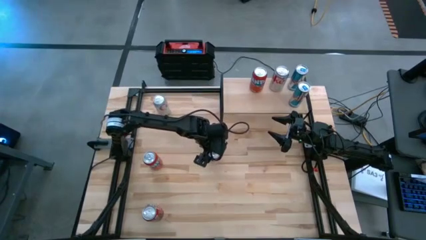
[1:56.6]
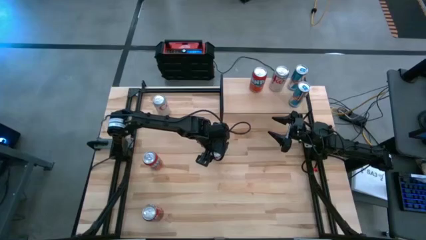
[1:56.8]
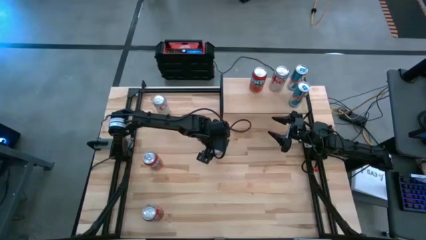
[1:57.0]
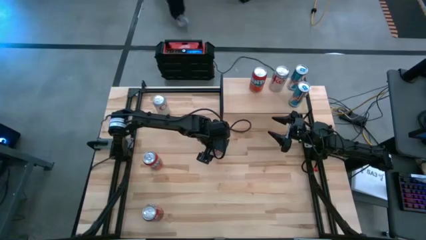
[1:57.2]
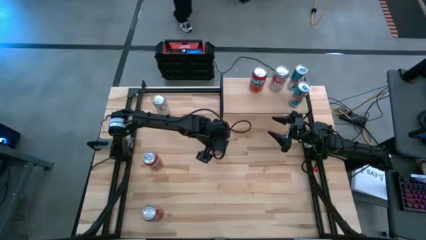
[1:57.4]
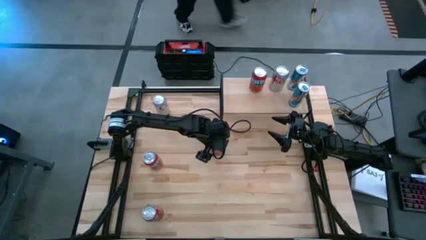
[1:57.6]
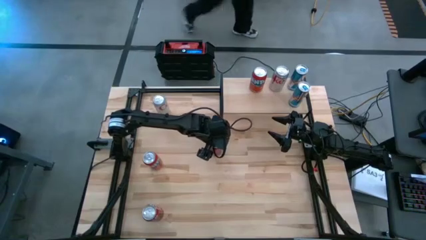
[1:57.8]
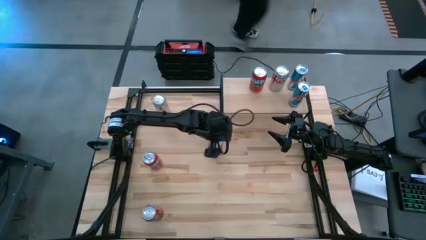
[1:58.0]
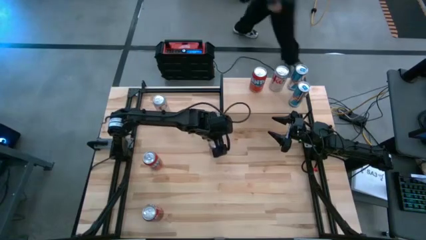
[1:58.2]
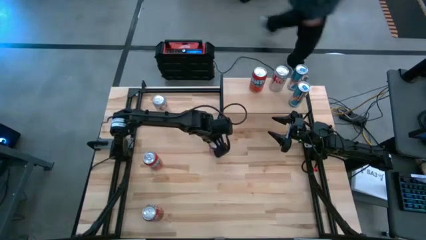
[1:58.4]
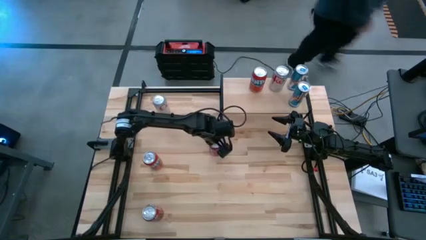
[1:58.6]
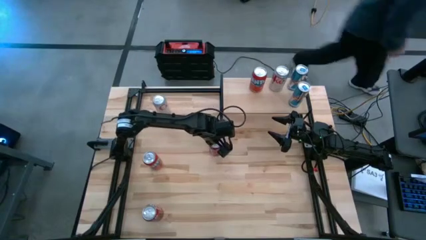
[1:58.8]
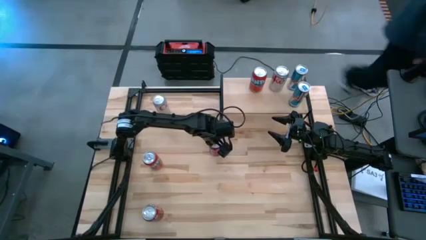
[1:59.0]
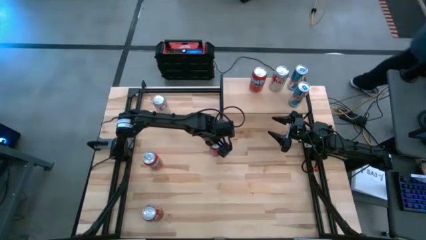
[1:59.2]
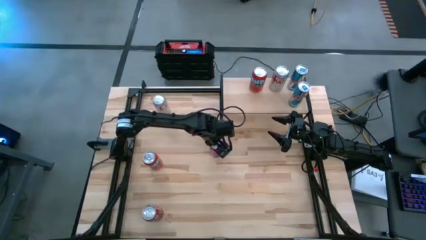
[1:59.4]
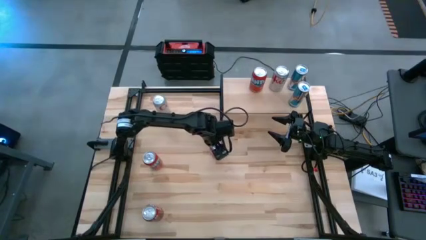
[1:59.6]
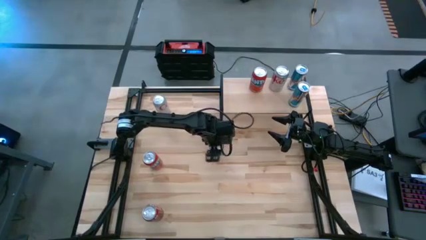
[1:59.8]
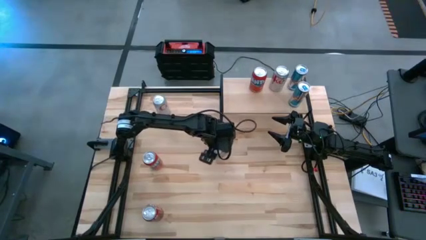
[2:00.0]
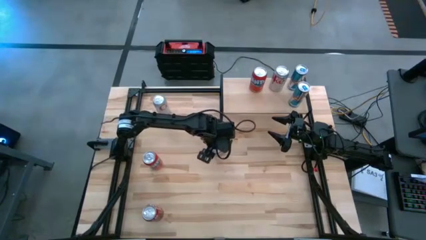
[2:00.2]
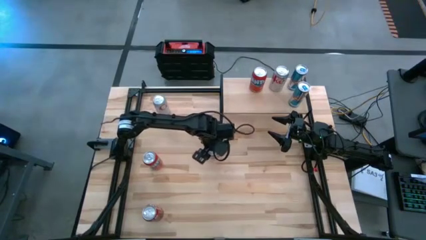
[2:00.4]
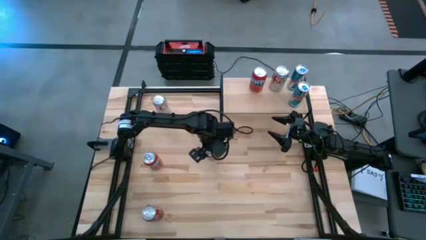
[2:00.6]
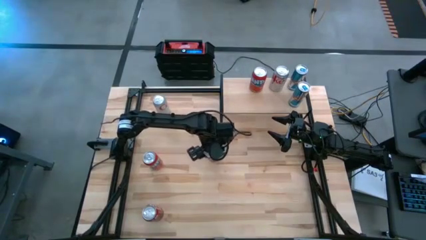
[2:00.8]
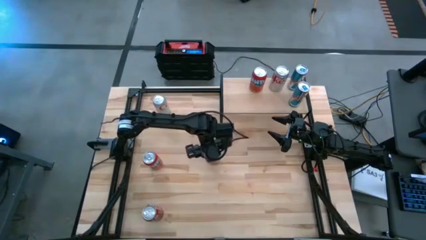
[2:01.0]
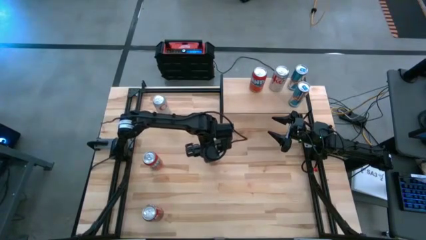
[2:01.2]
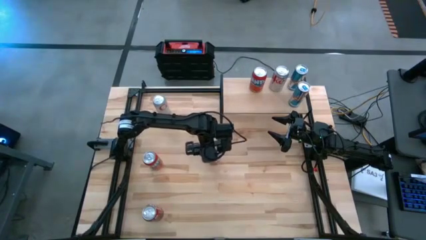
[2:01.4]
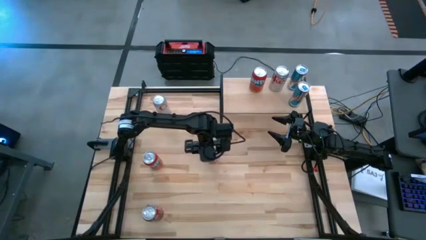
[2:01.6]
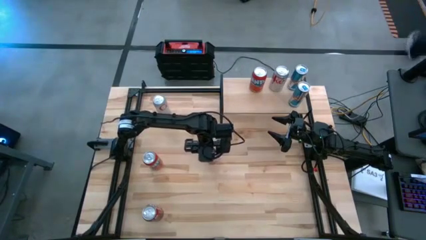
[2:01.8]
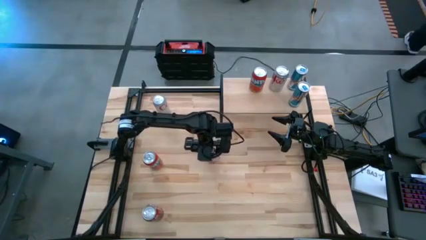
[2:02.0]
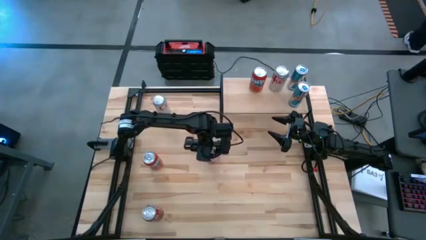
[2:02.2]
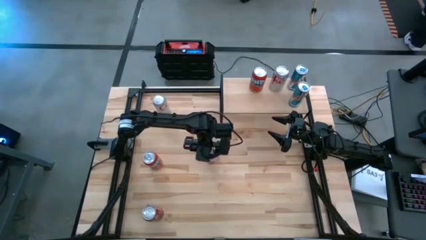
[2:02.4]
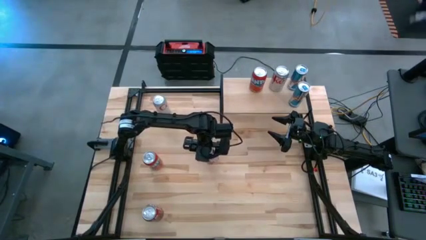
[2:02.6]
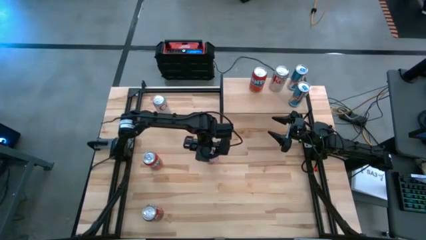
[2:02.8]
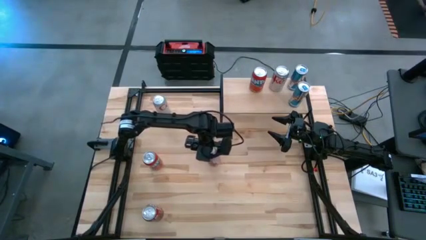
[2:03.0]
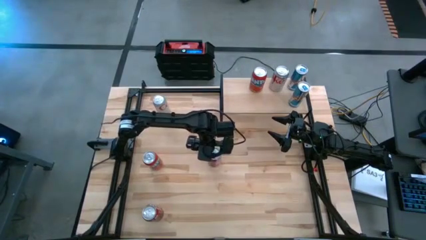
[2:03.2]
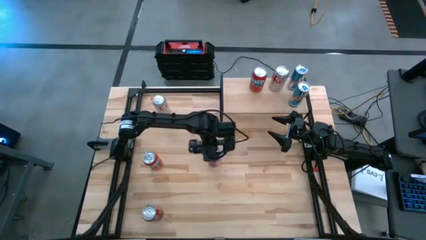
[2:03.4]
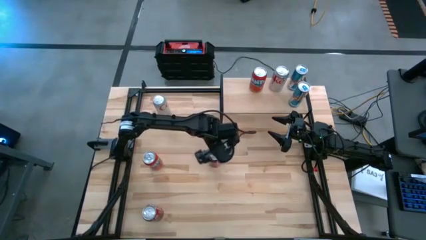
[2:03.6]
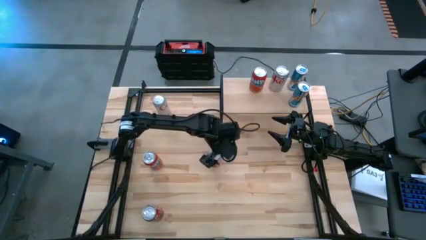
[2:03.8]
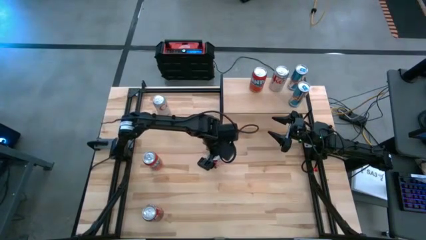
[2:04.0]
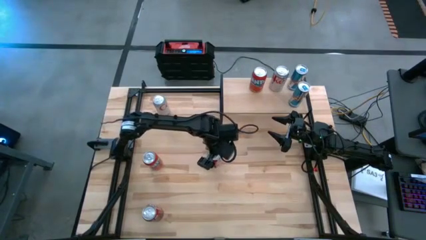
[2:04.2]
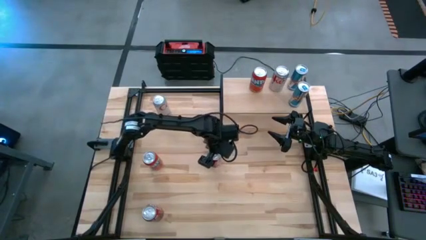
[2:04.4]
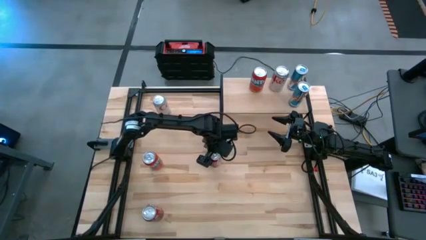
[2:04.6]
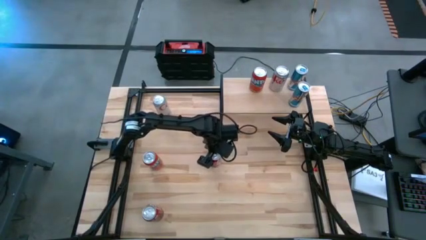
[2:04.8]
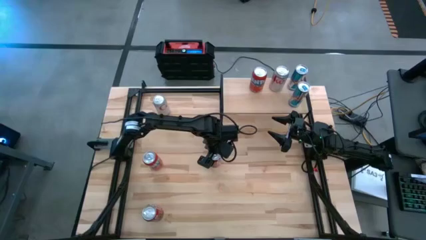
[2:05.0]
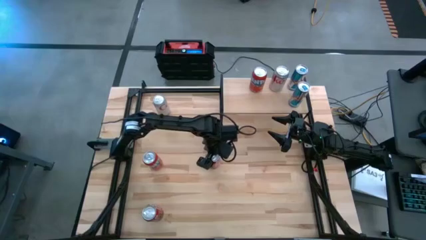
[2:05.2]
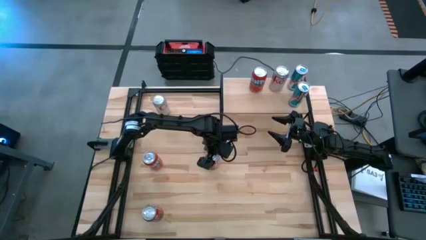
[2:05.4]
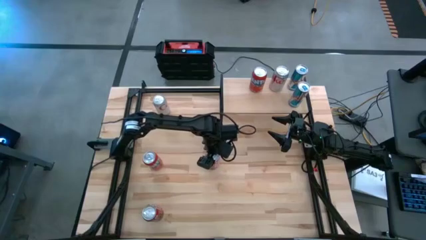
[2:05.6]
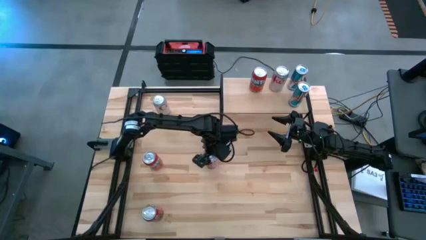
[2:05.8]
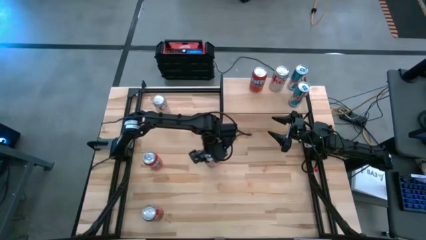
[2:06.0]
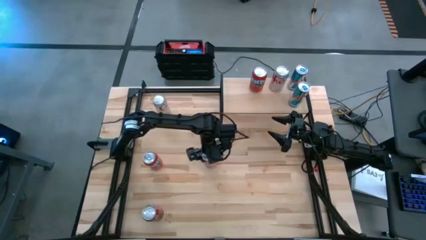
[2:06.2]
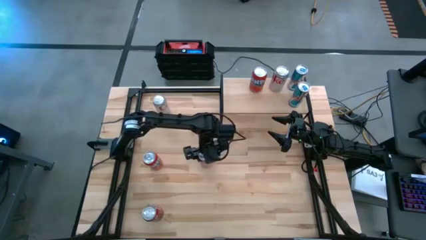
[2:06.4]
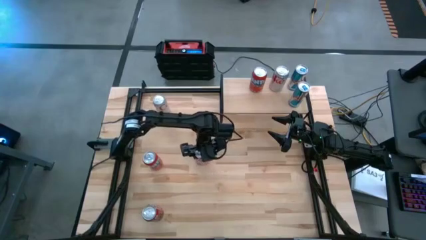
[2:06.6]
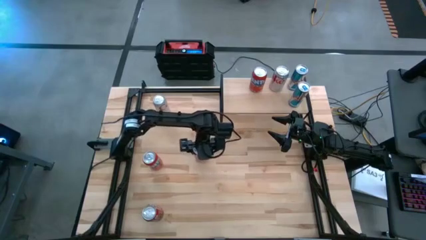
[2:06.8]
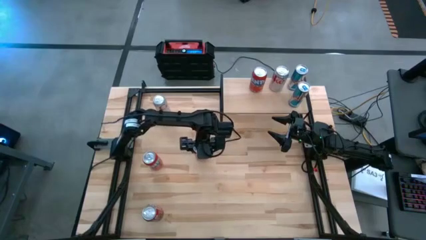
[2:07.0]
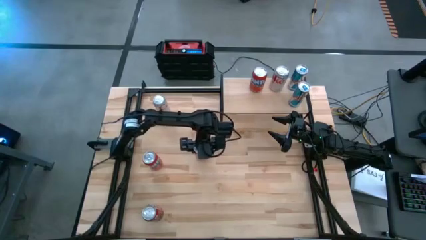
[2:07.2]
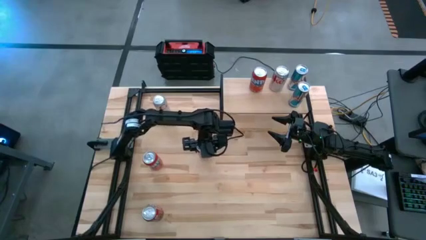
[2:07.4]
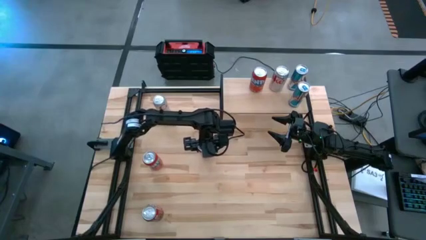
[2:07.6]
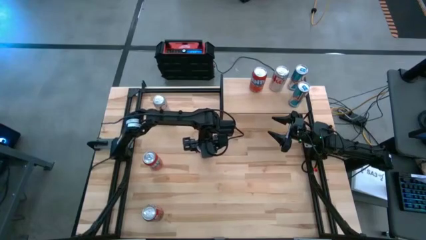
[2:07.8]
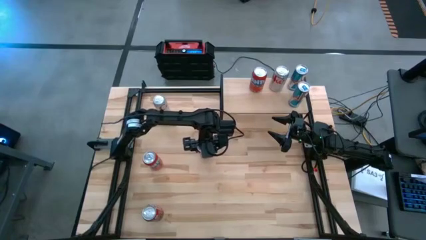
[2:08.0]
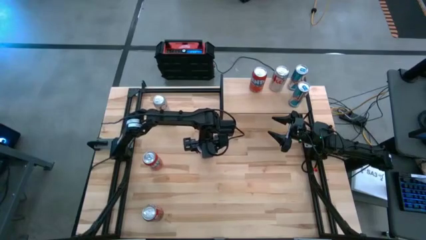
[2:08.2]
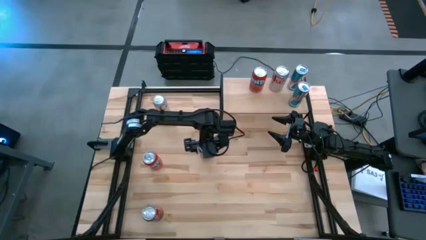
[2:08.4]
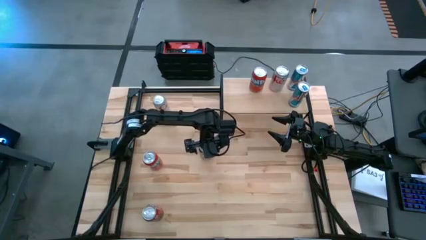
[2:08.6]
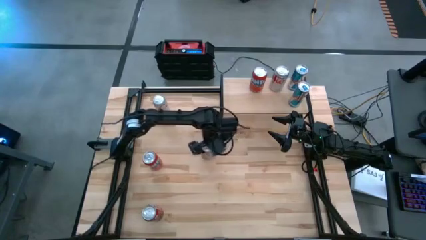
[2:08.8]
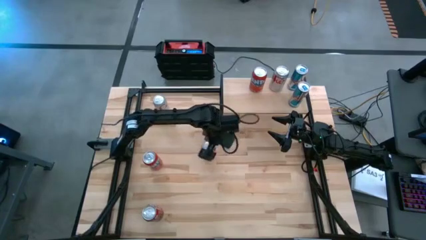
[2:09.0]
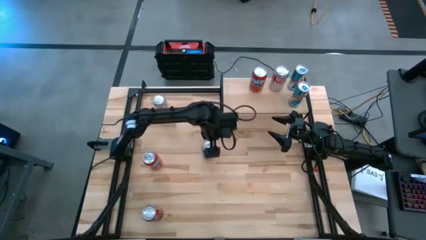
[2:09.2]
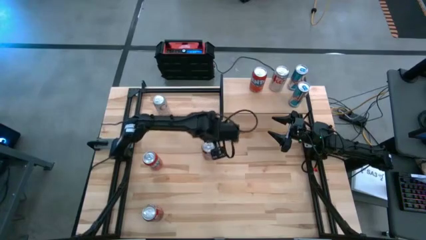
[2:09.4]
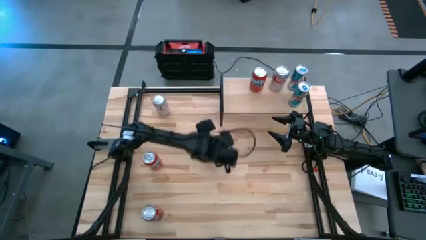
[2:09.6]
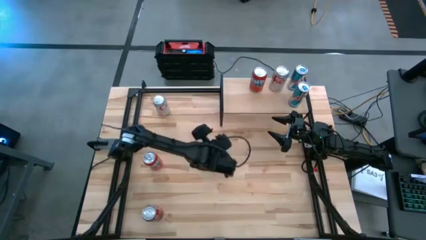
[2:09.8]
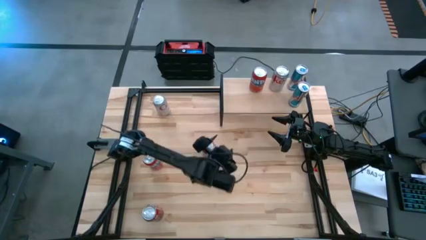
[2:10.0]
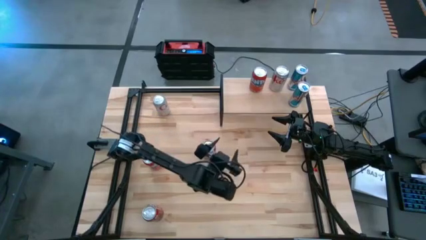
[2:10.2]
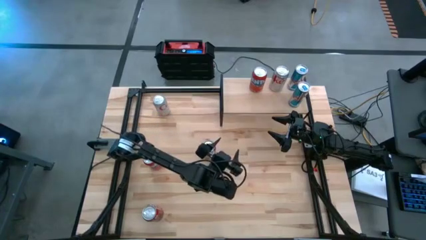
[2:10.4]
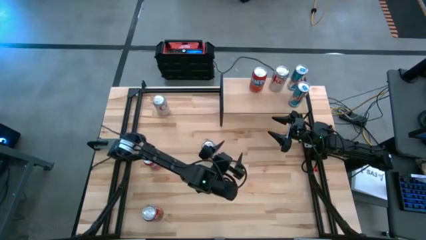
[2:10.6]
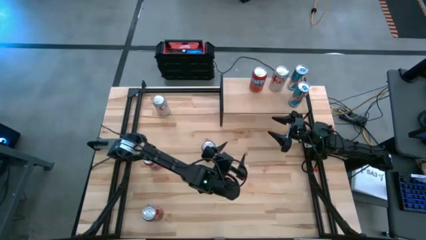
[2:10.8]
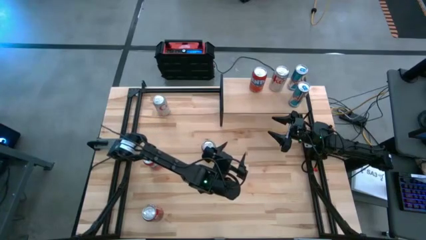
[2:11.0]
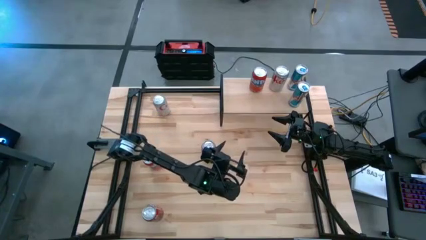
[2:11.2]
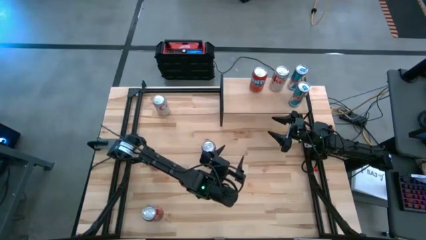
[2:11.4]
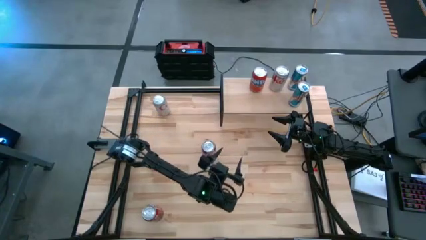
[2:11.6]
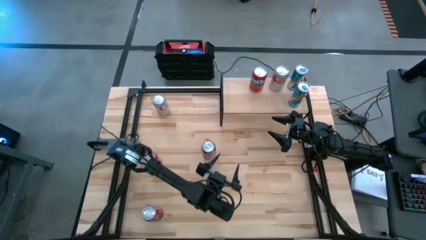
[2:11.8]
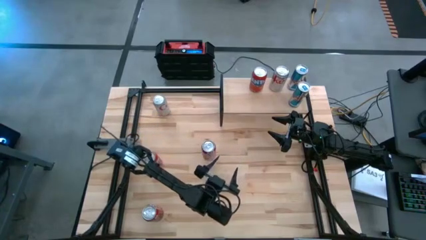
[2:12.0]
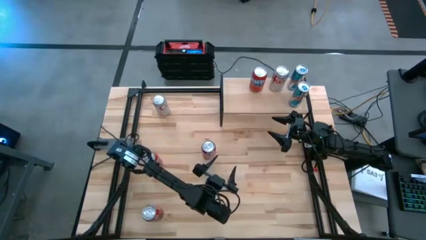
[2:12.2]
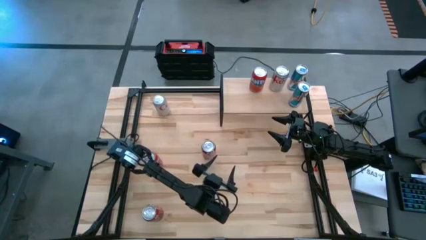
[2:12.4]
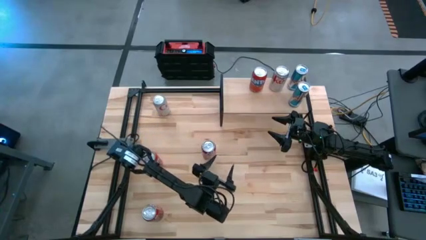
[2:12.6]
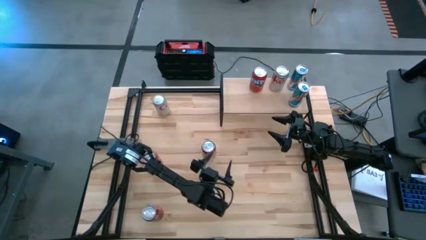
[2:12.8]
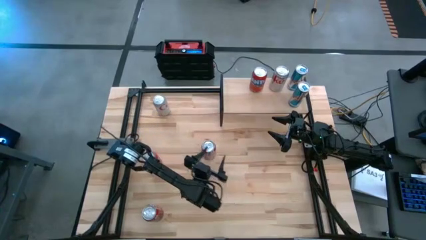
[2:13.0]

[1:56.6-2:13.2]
Task: Place canned beverage on shelf
Put the top red white soda can on the shelf

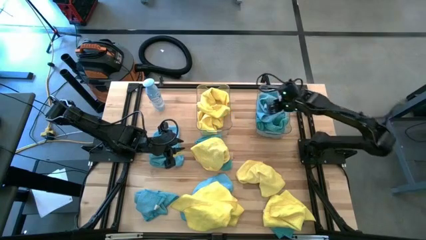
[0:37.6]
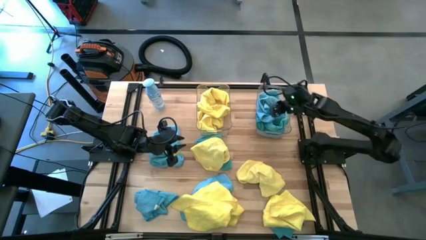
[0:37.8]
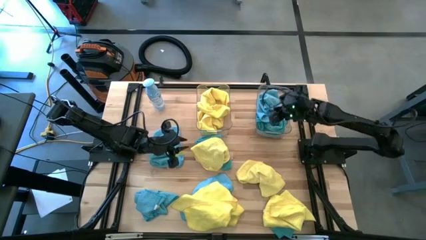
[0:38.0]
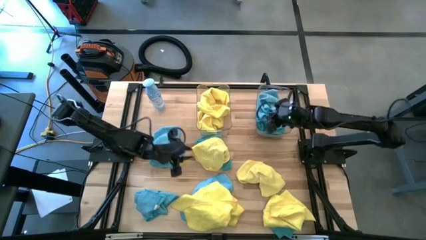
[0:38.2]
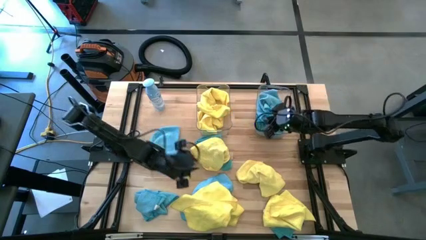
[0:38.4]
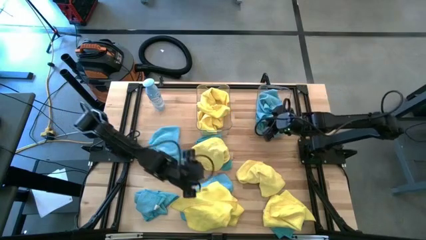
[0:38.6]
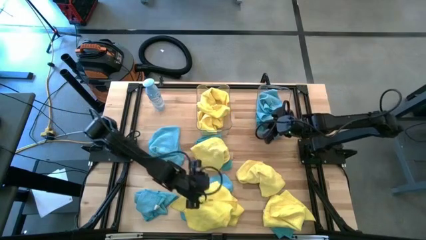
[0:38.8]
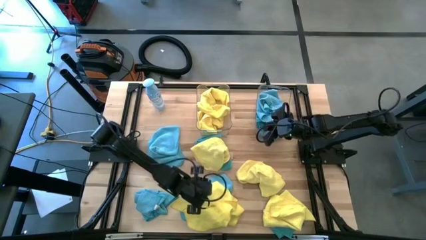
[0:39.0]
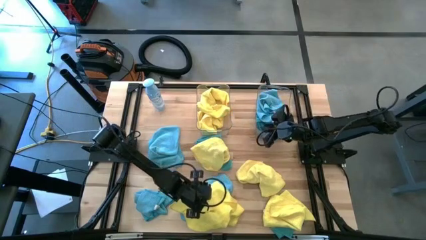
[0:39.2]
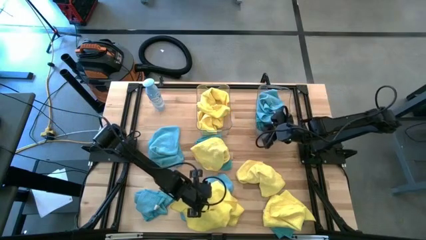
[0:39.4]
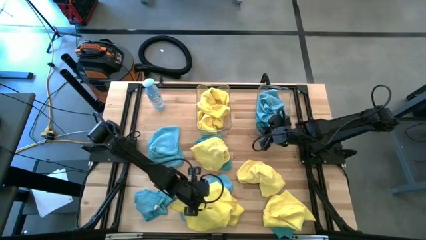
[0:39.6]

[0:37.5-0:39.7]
Task: Sort microfiber towel by color & place in baskets
Put the yellow towel into the left transparent bin
